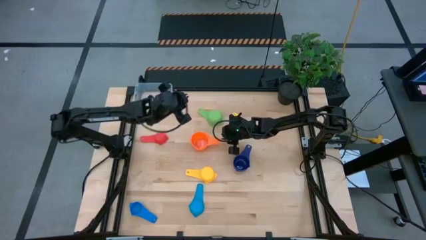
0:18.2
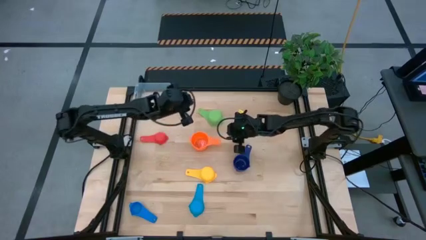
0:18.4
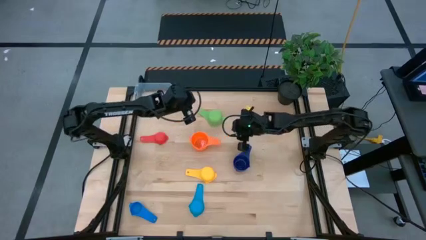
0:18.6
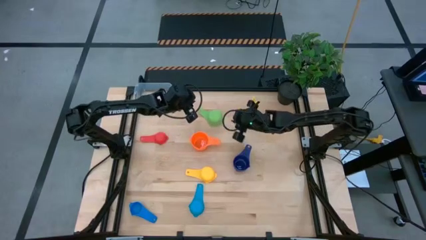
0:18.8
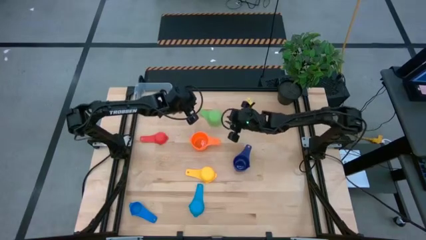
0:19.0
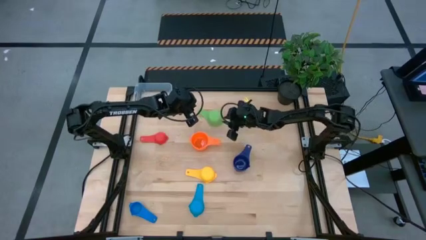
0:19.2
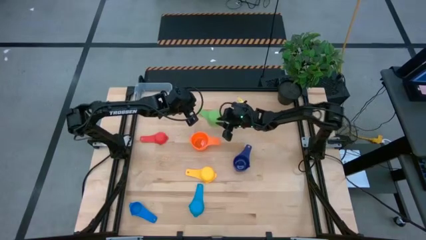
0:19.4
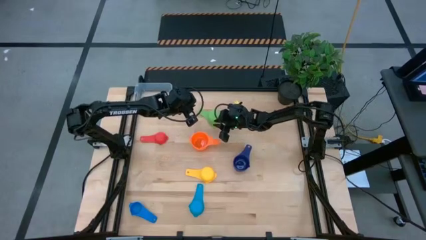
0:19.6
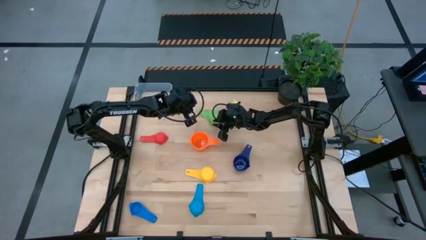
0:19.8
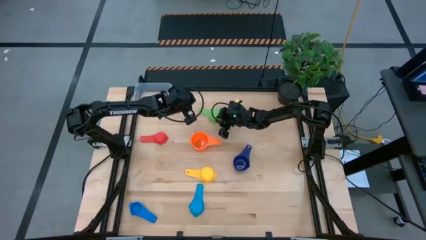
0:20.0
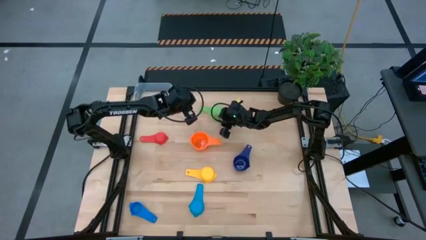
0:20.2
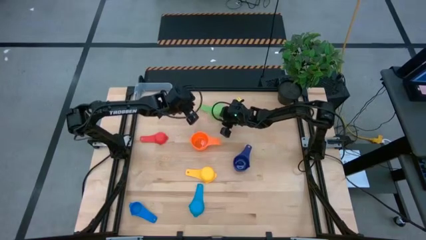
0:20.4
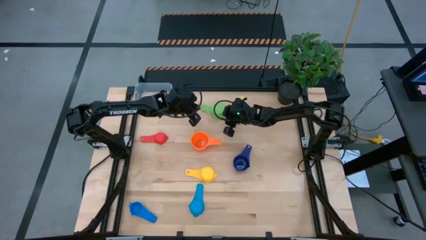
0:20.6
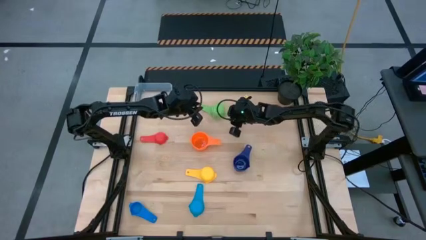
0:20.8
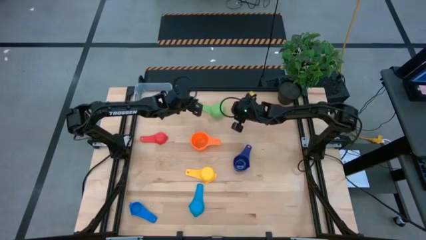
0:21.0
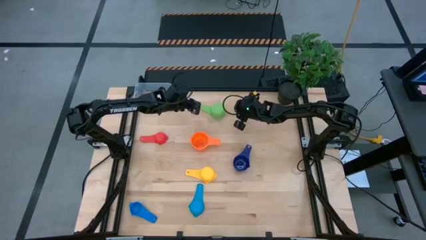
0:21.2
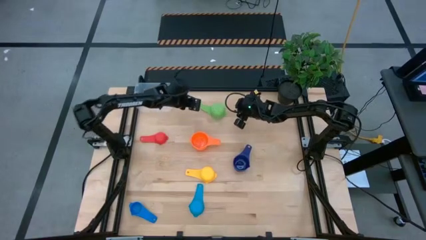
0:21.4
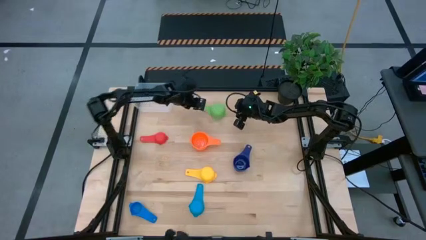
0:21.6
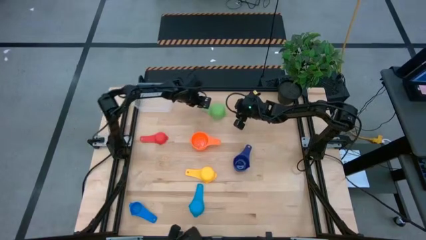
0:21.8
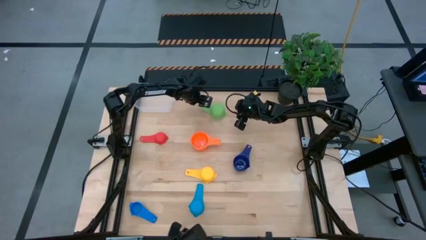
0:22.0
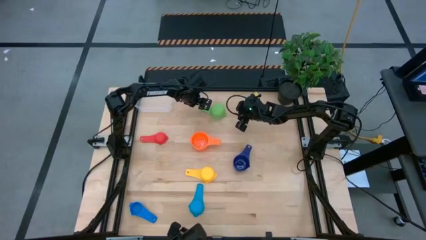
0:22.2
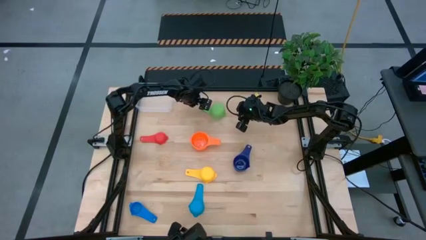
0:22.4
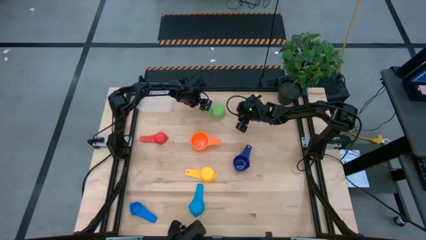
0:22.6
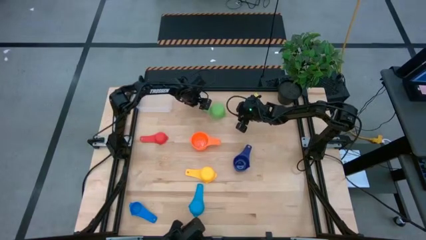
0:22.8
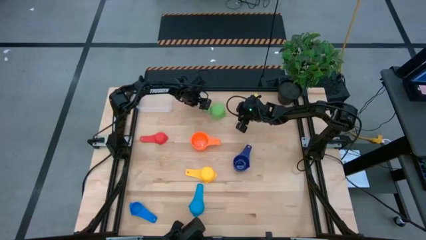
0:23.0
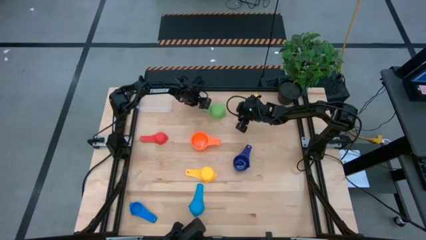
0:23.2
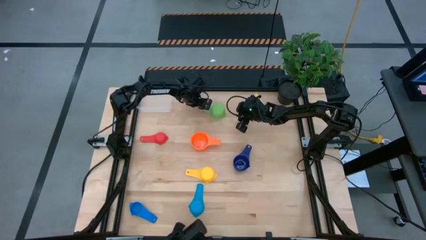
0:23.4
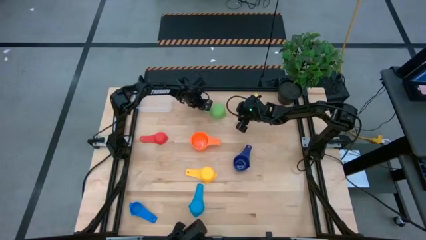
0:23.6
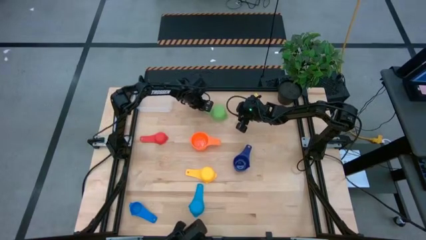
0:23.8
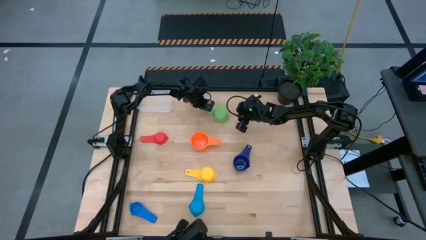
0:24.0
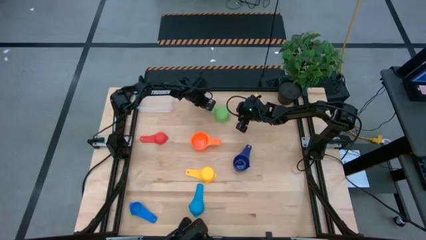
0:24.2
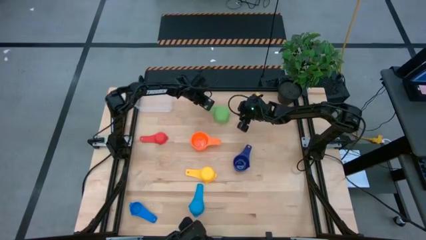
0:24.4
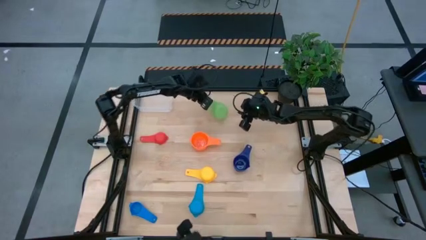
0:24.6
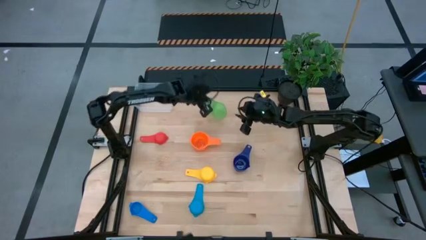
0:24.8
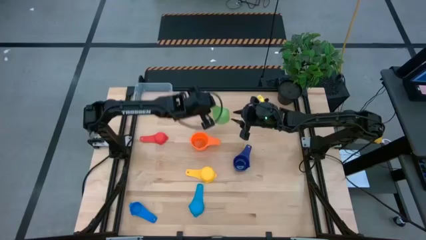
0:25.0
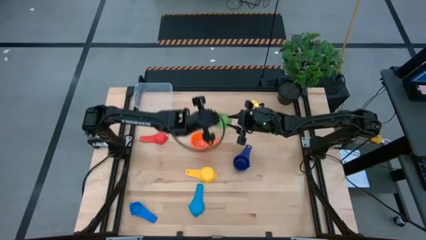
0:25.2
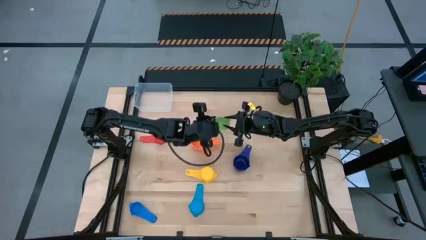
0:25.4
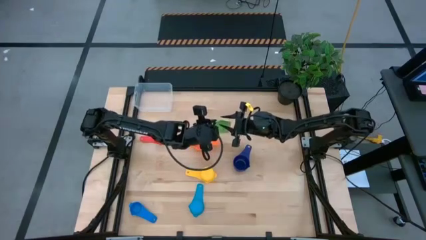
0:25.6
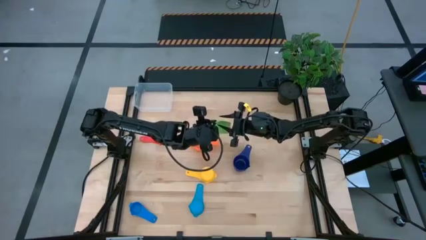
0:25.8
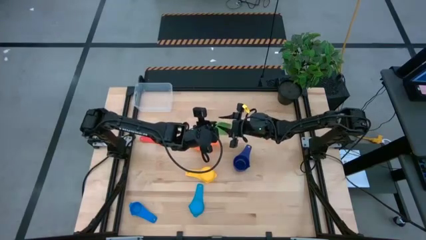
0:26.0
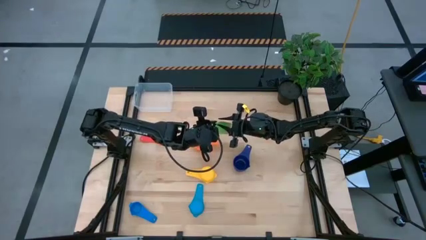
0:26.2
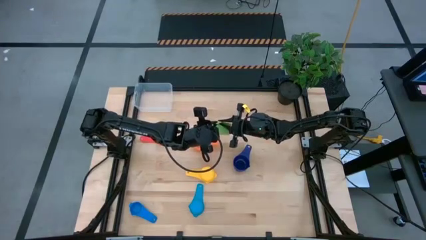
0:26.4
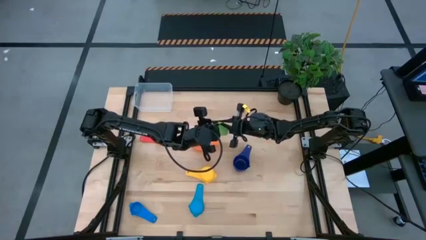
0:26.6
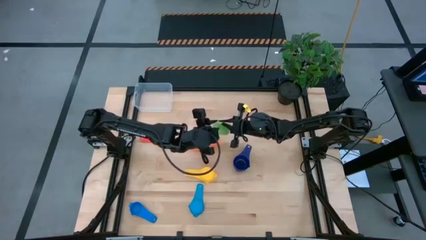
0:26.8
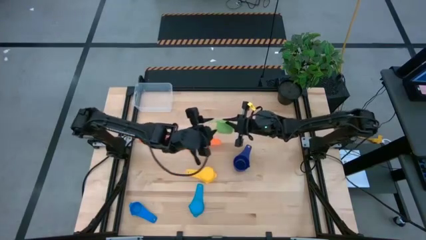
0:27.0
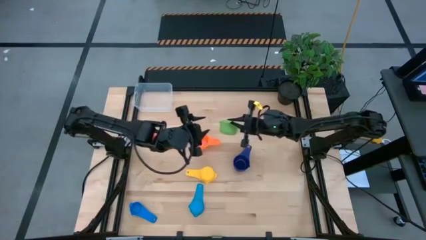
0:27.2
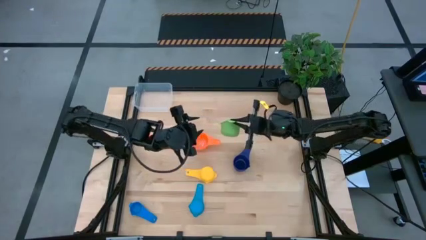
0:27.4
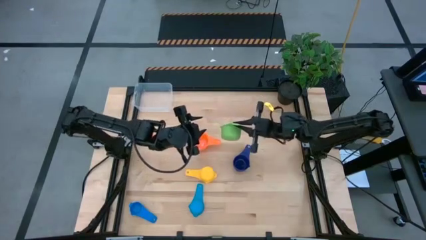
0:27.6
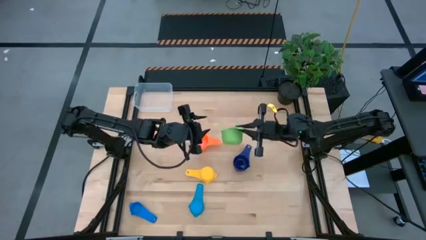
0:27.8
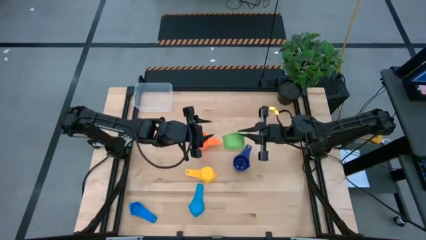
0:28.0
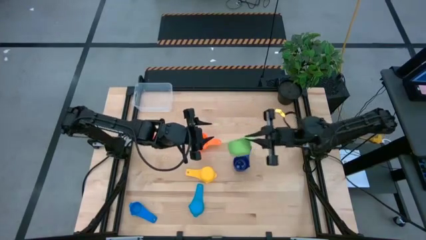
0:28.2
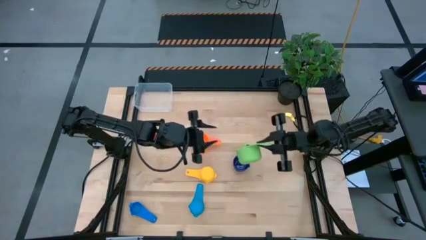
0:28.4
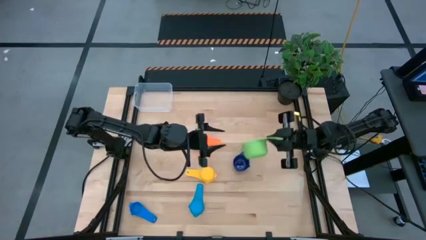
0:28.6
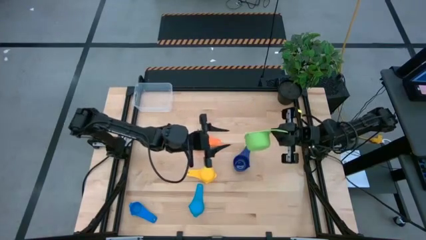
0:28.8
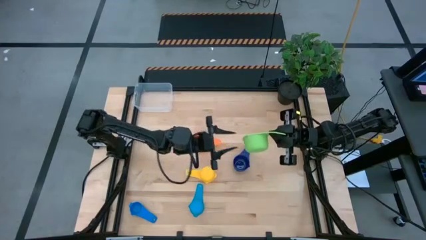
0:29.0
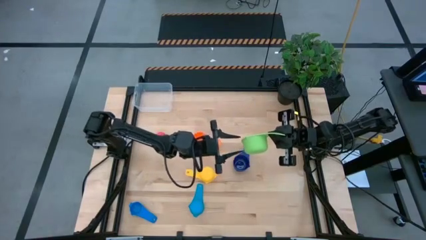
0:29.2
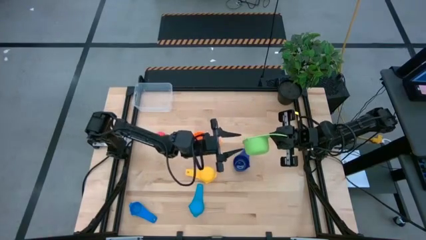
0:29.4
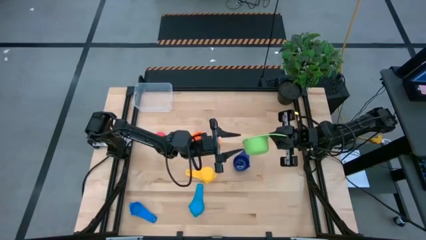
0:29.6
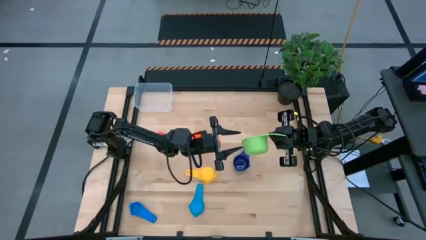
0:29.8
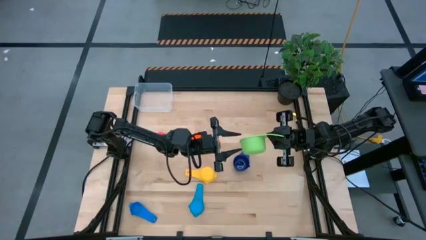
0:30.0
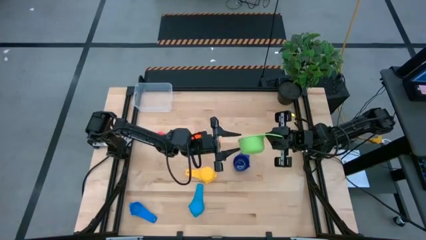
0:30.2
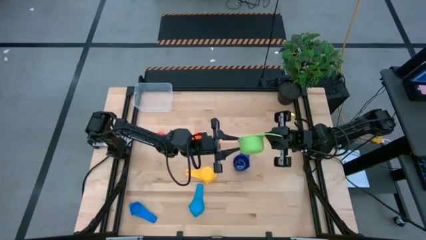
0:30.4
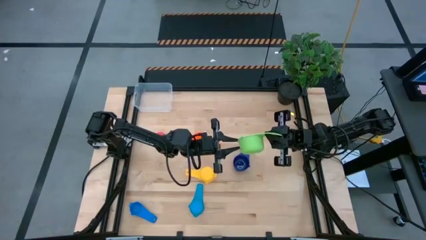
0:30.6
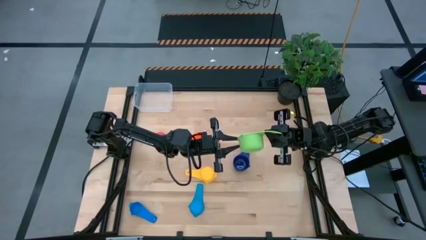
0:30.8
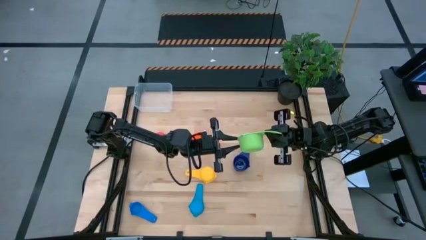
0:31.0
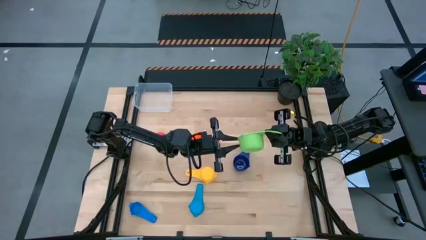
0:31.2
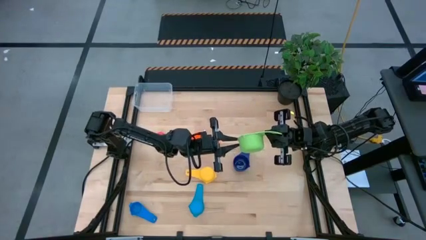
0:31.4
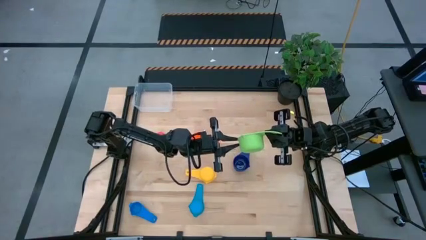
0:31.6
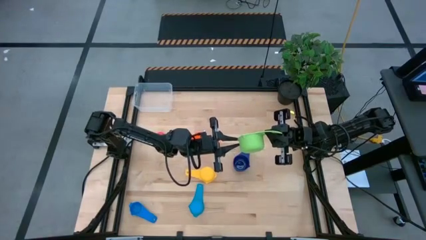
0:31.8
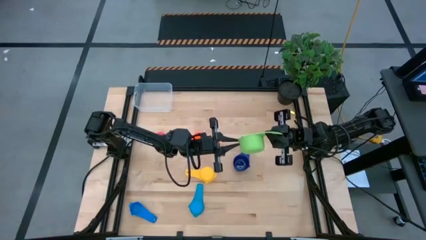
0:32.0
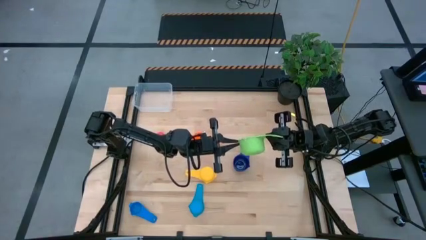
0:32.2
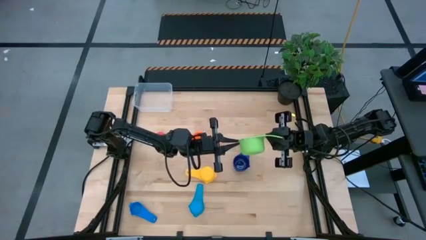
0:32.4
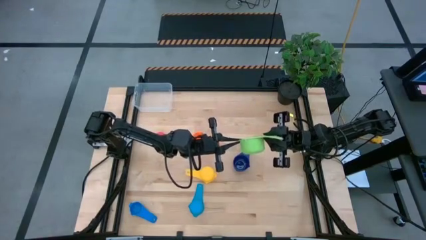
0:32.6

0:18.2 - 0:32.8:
Task: Nest measuring cups in basket
Stack the green measuring cup on top of the orange measuring cup
